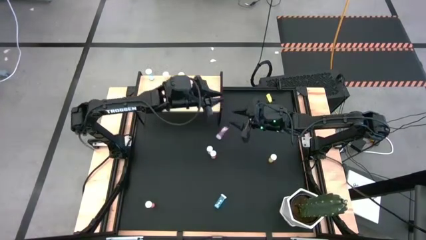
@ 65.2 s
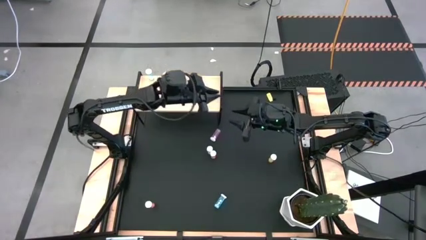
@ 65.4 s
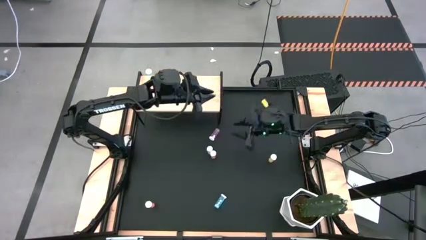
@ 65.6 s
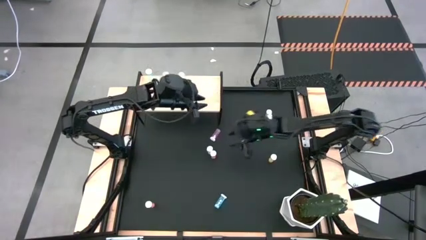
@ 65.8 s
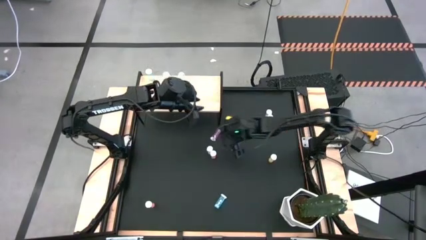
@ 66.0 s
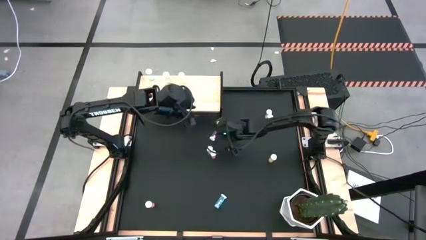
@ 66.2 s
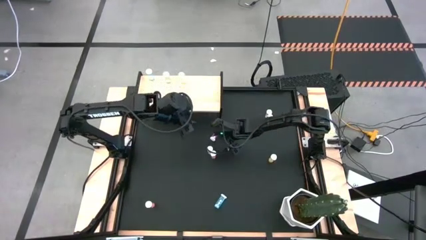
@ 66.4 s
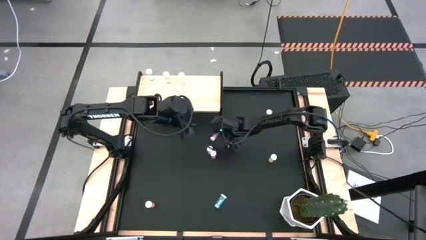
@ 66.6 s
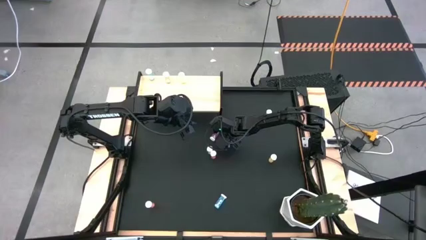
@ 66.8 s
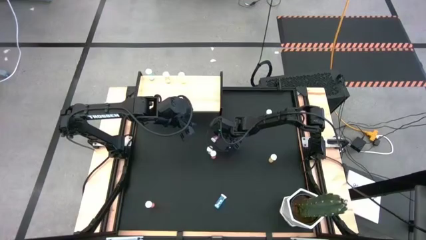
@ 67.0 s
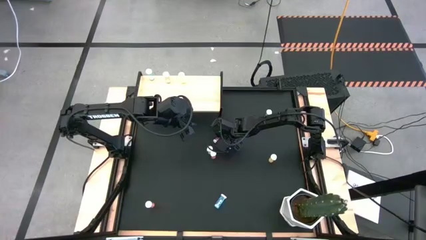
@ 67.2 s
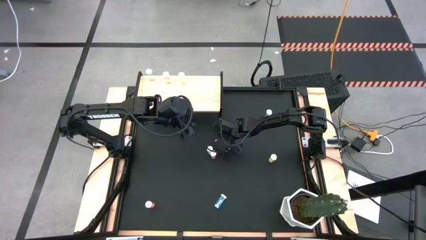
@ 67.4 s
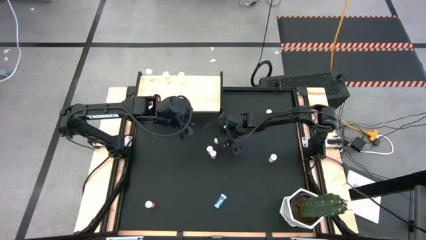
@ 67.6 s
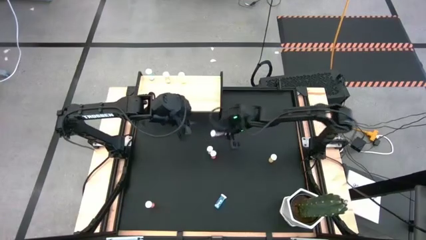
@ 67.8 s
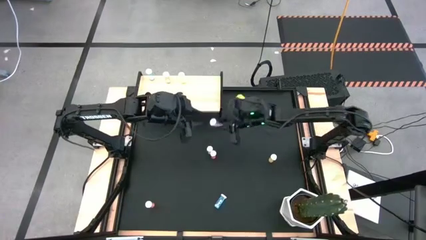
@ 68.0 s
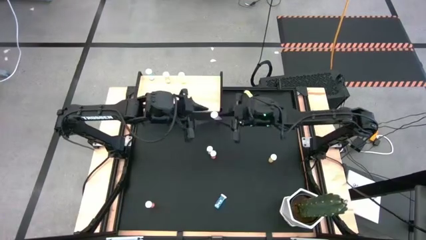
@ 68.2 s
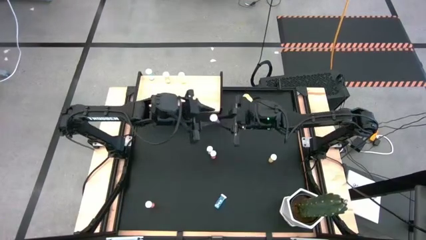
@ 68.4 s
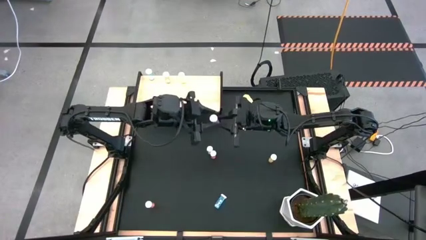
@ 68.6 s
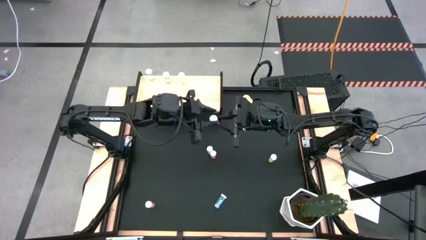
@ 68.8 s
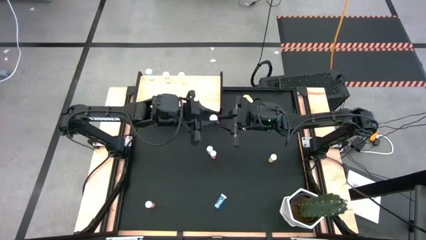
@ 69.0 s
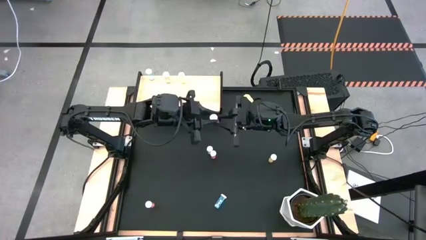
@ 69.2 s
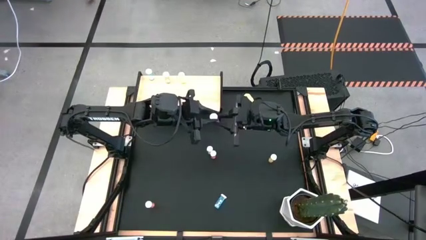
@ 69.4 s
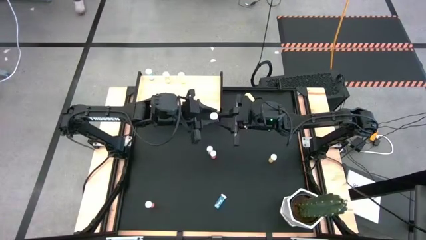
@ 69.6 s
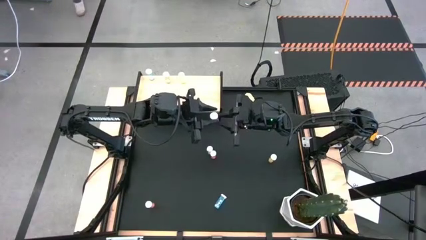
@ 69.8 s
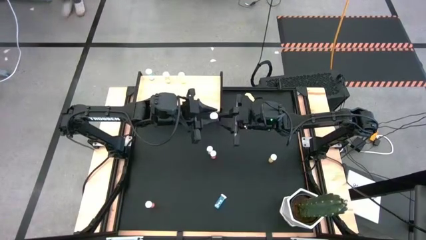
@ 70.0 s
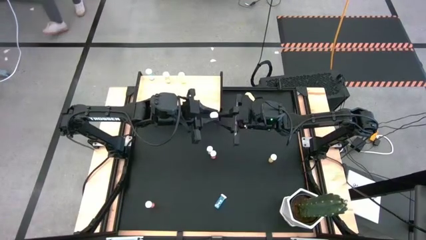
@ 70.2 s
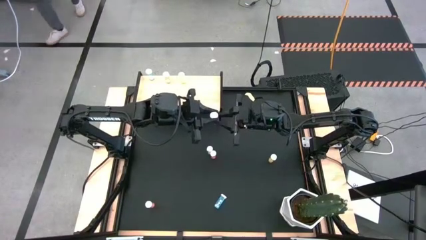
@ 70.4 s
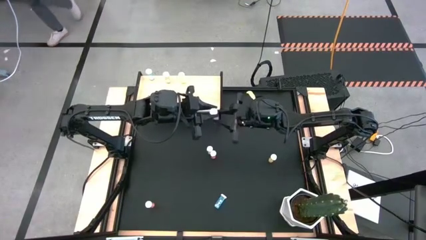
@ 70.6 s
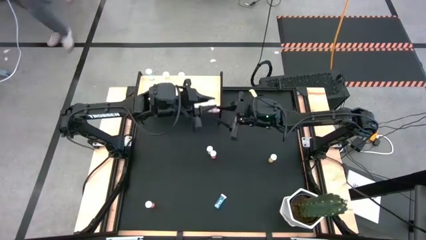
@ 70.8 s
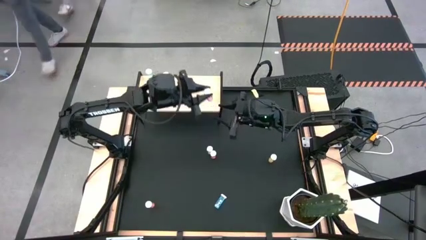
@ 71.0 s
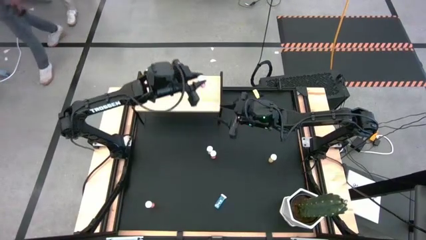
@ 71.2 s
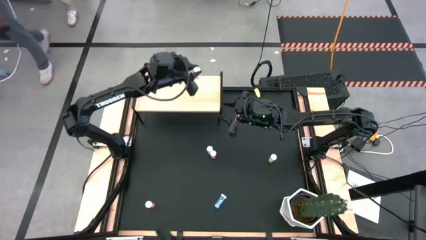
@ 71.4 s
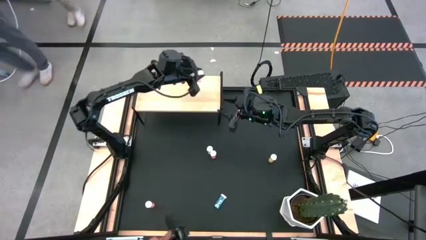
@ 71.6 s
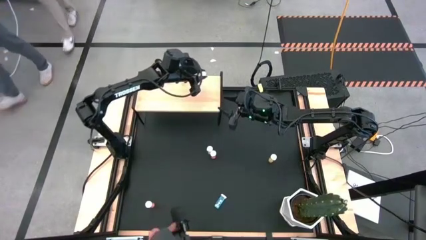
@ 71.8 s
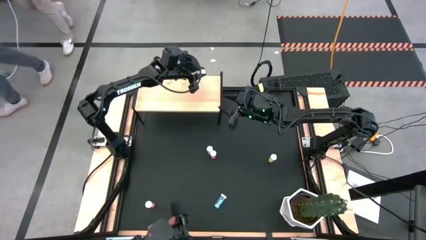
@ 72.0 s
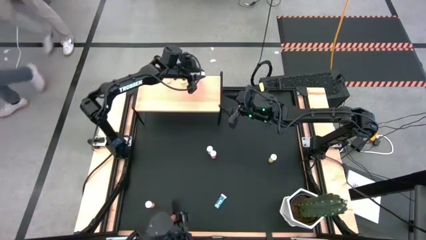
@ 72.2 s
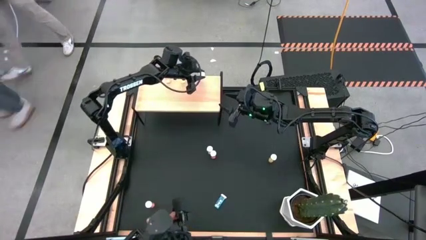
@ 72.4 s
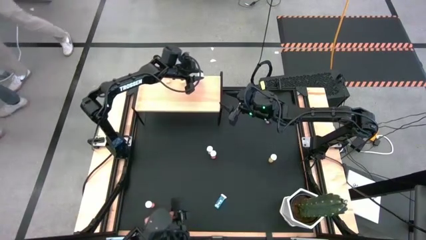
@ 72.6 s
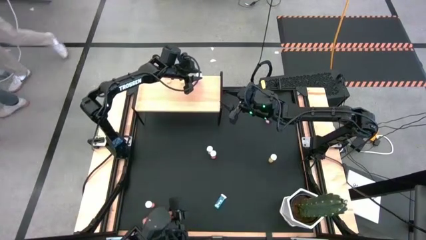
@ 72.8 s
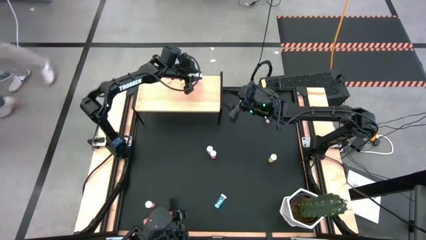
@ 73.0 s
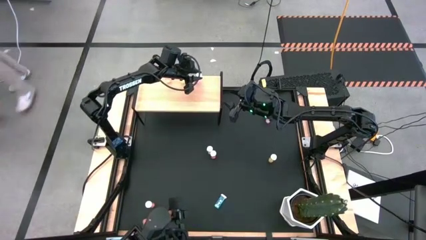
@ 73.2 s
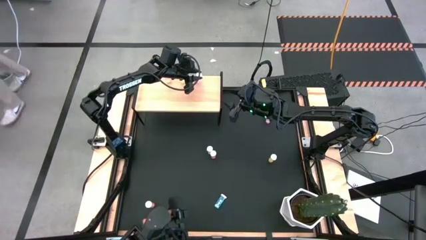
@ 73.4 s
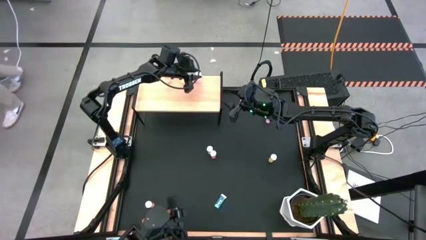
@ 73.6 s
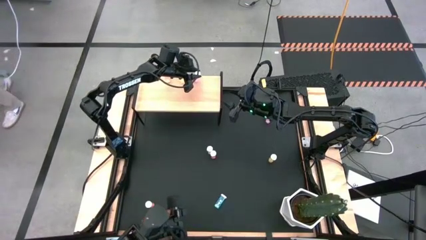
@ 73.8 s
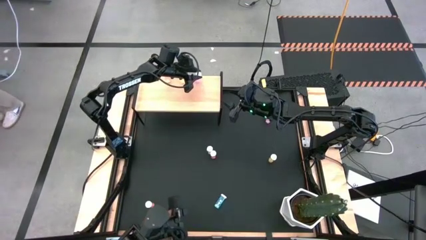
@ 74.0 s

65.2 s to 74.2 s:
Task: Pick and place medicine bottles onto shelf by color
Put the top pink pill bottle on the shelf

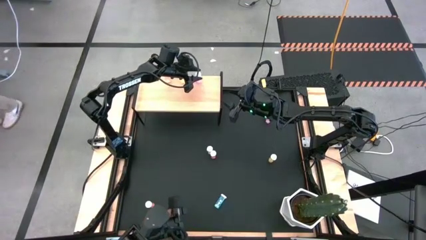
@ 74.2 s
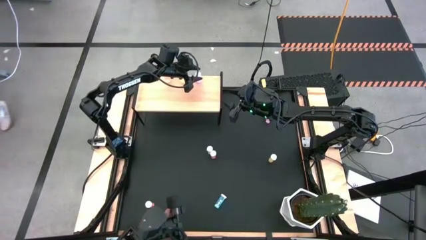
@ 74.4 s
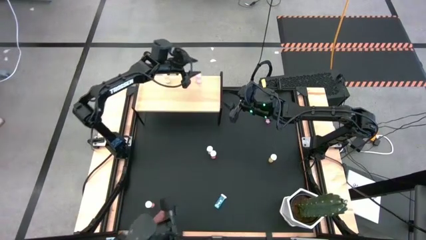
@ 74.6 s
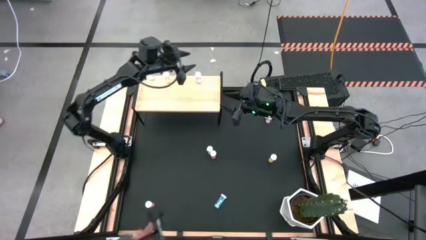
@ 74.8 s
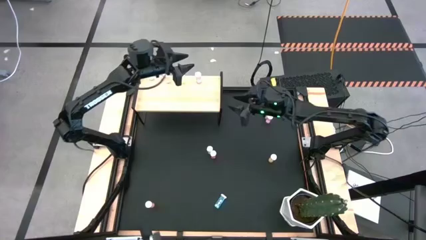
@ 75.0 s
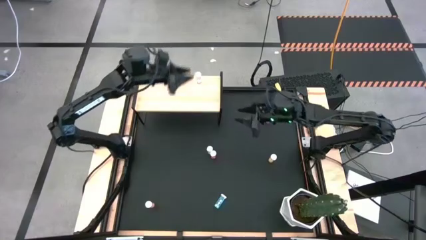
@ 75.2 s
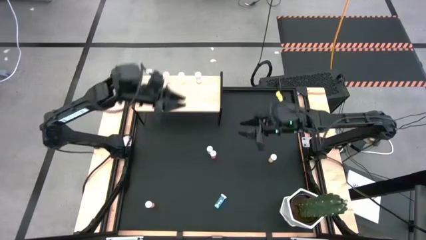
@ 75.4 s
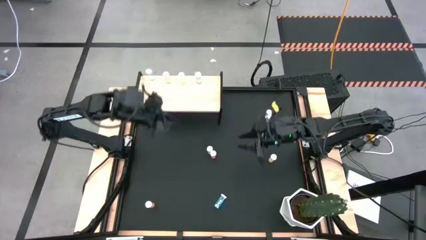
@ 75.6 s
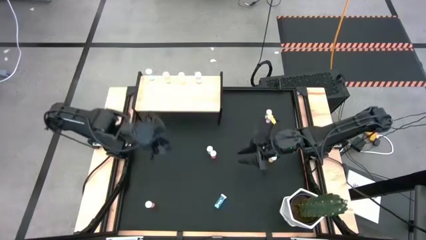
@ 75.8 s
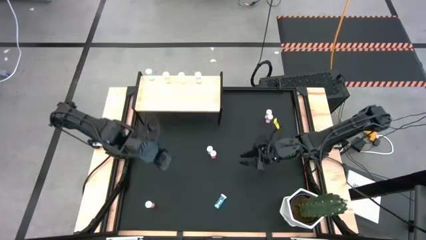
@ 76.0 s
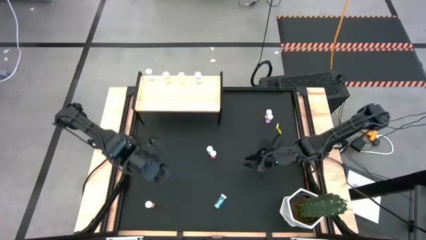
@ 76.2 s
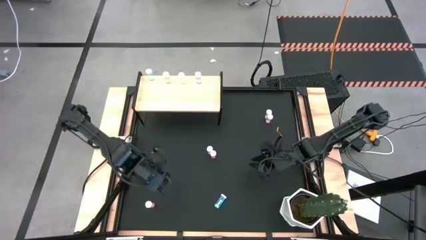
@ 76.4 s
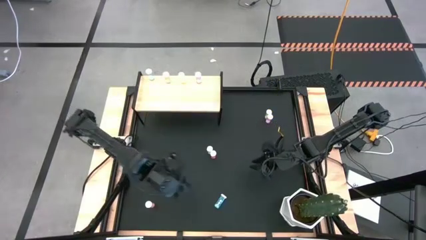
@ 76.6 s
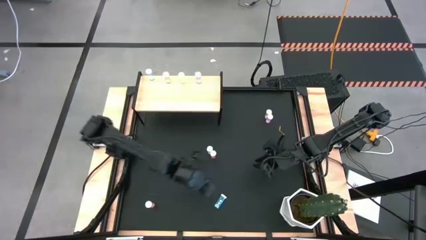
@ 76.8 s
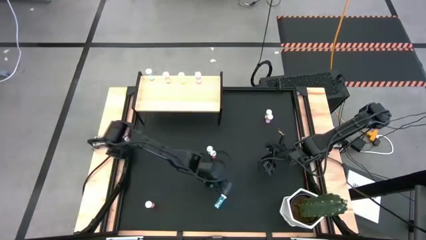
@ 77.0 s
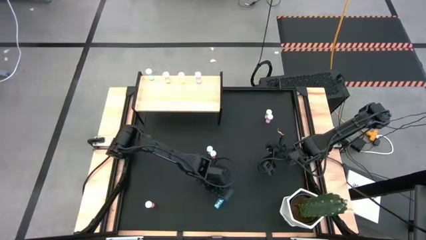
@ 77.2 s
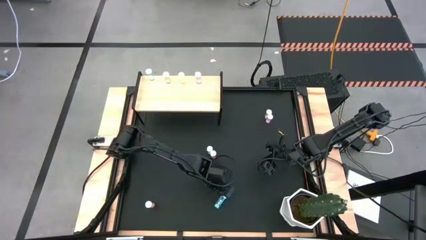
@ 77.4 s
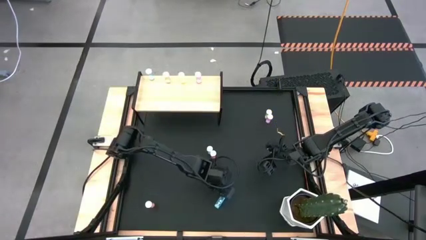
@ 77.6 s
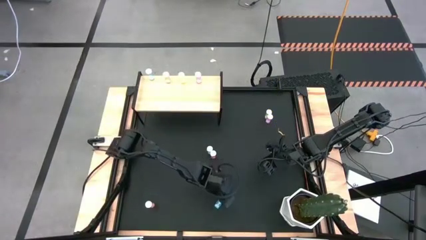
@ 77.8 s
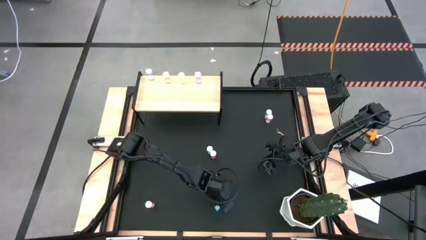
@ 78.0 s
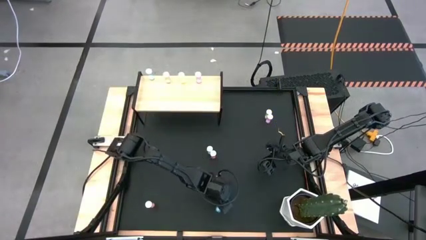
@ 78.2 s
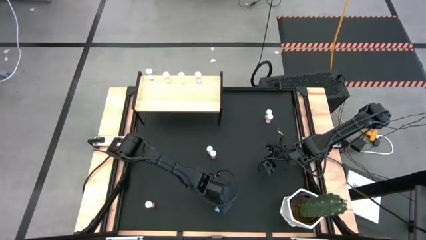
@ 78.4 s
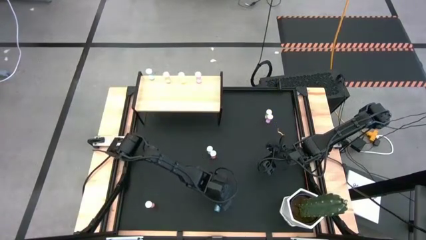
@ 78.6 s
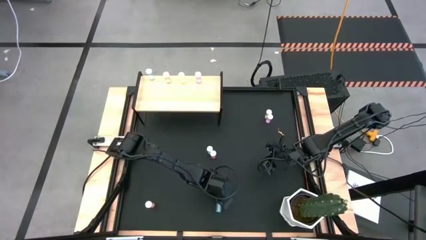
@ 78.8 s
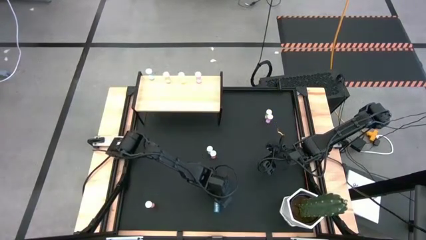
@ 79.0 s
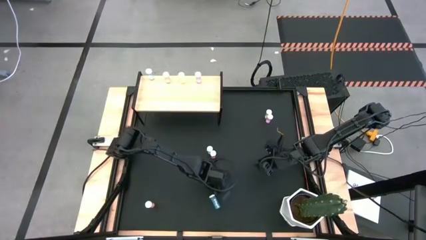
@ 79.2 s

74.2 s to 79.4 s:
Put the bottom blue pill bottle on the shelf aligned with the blue pill bottle
